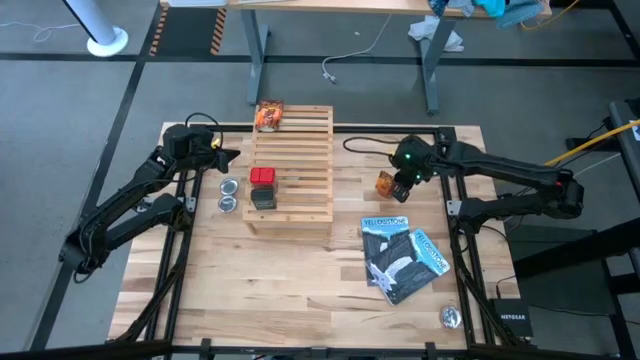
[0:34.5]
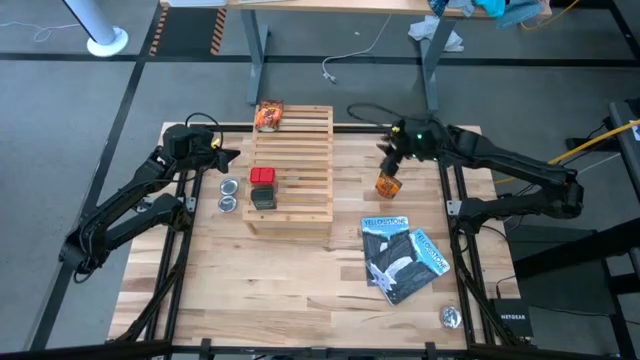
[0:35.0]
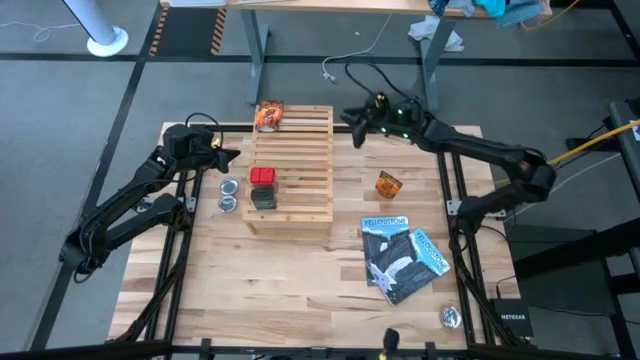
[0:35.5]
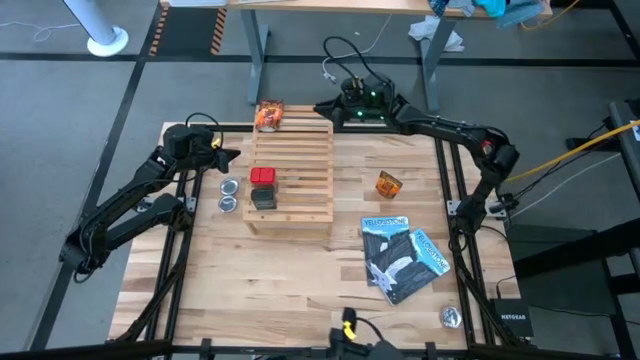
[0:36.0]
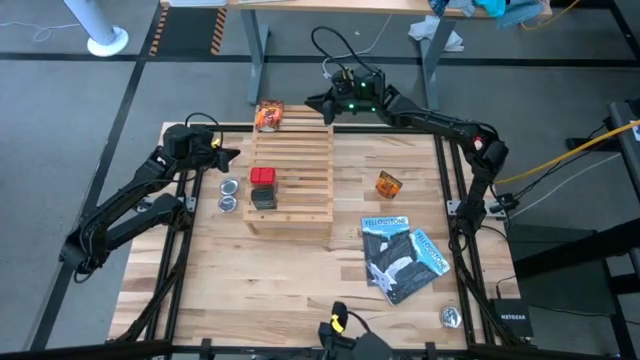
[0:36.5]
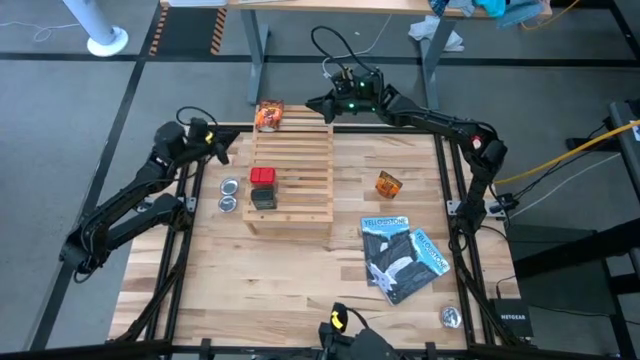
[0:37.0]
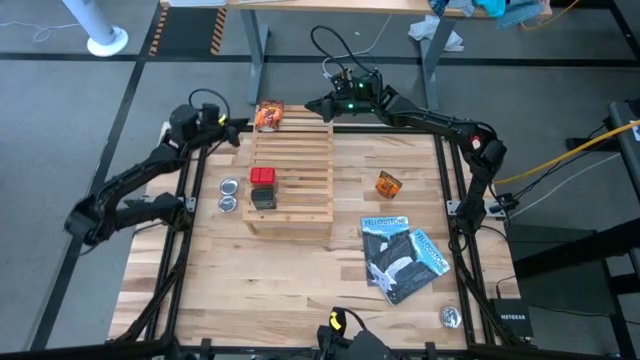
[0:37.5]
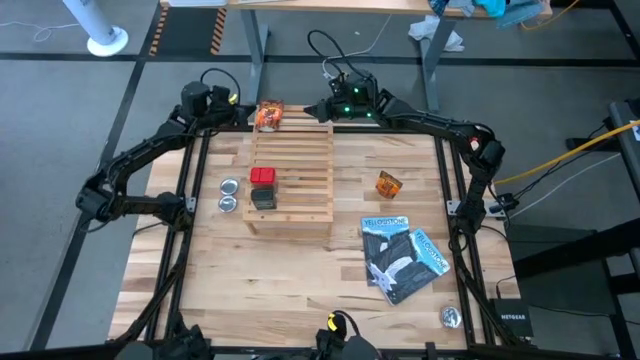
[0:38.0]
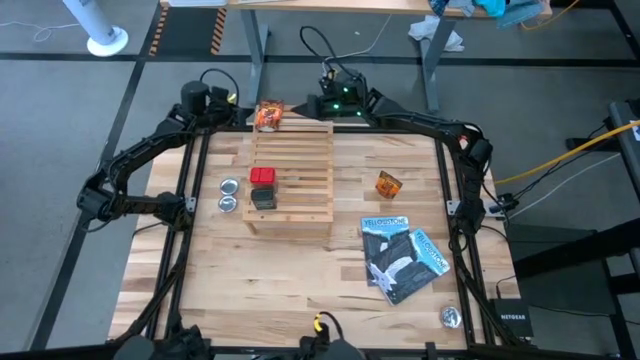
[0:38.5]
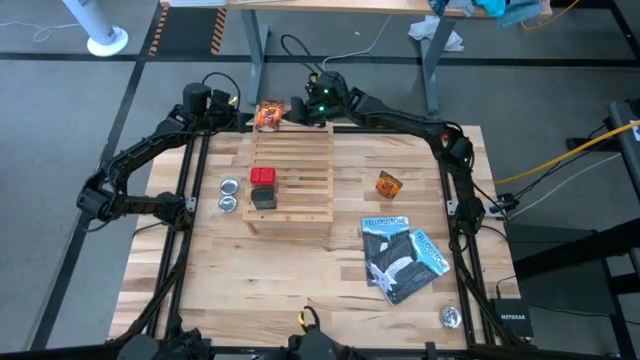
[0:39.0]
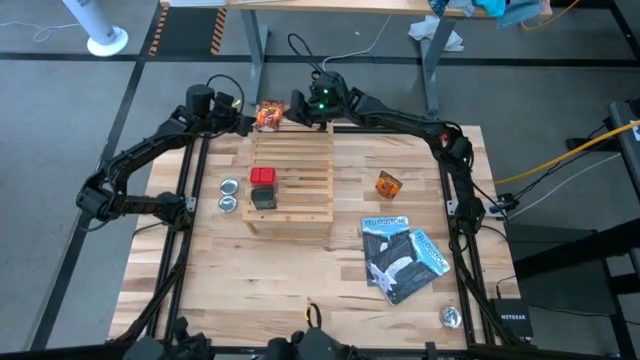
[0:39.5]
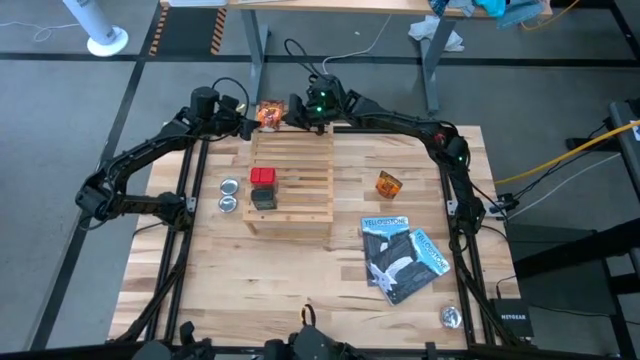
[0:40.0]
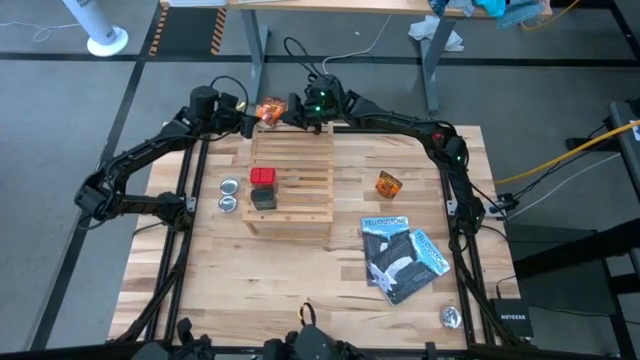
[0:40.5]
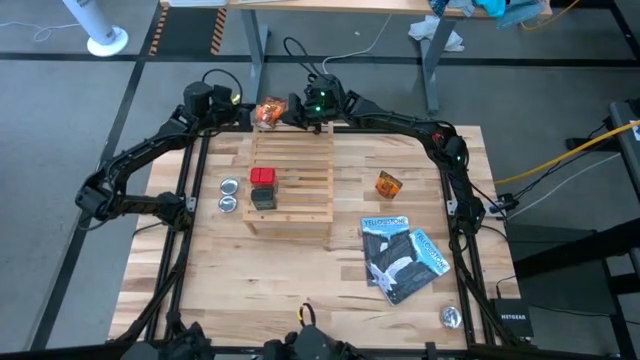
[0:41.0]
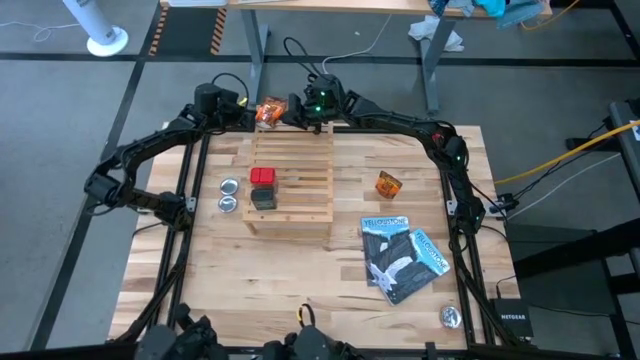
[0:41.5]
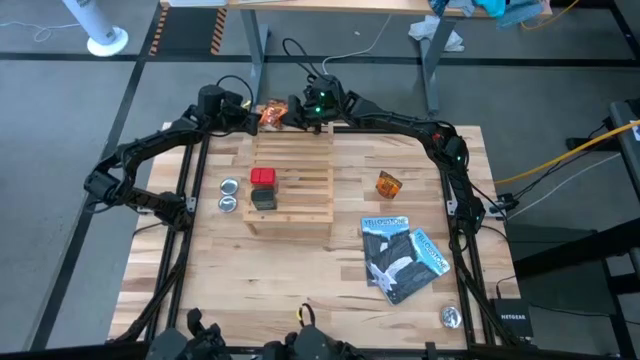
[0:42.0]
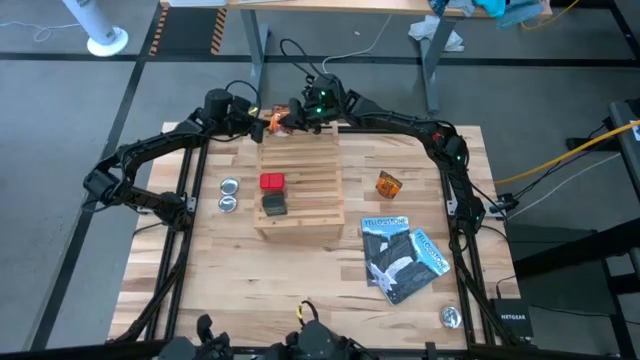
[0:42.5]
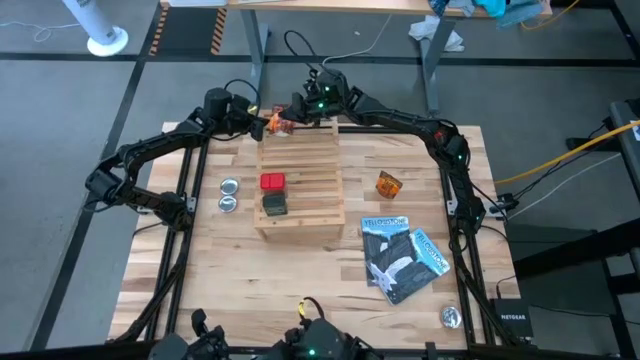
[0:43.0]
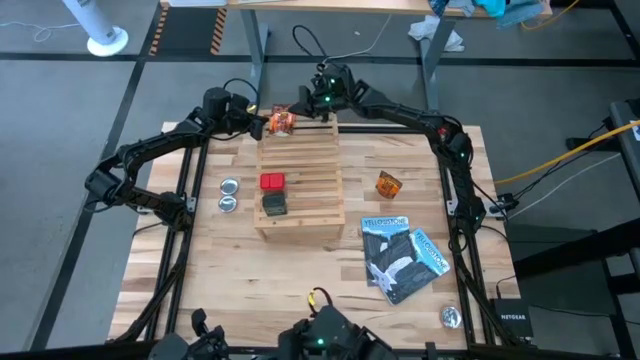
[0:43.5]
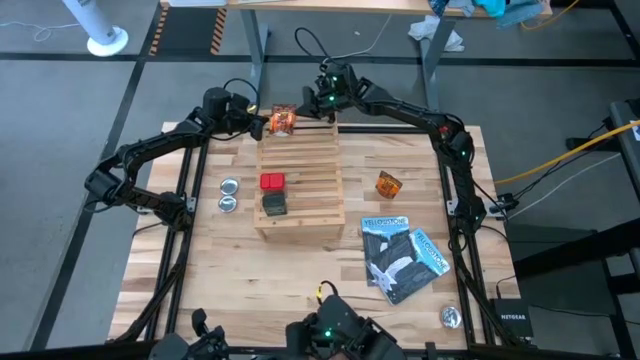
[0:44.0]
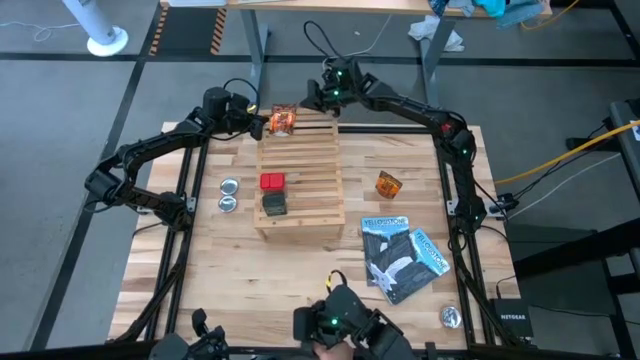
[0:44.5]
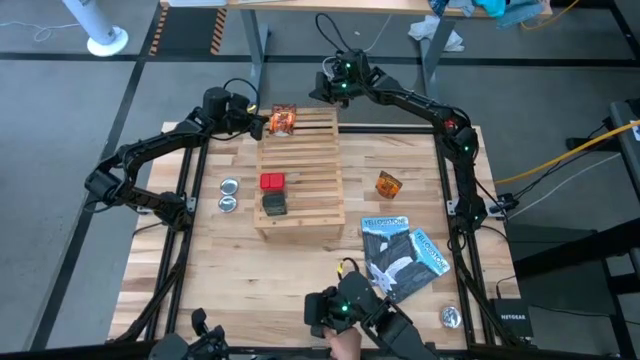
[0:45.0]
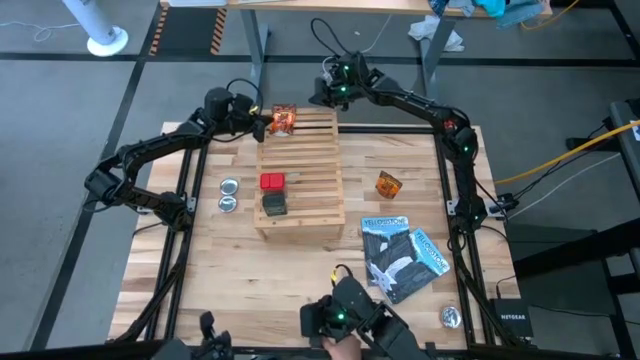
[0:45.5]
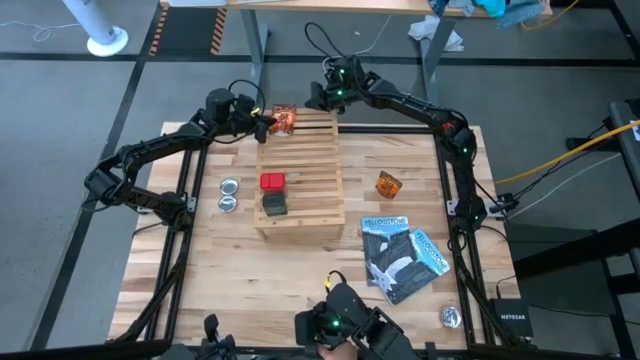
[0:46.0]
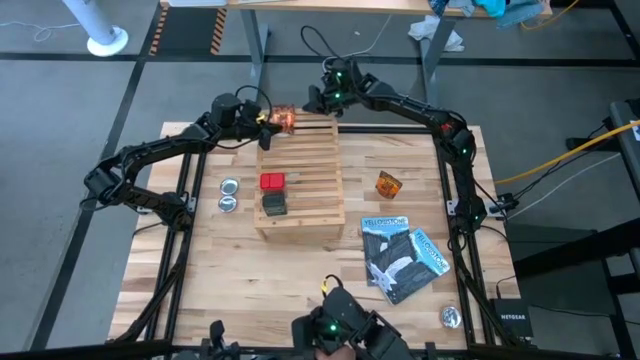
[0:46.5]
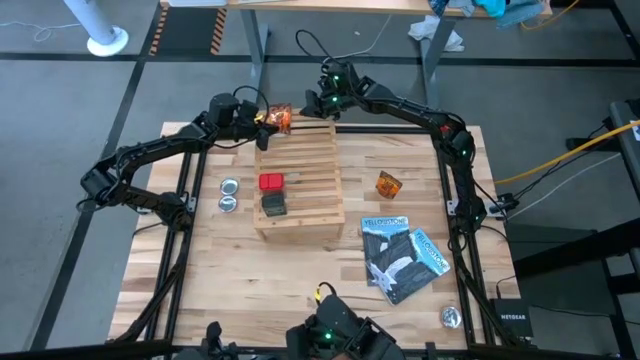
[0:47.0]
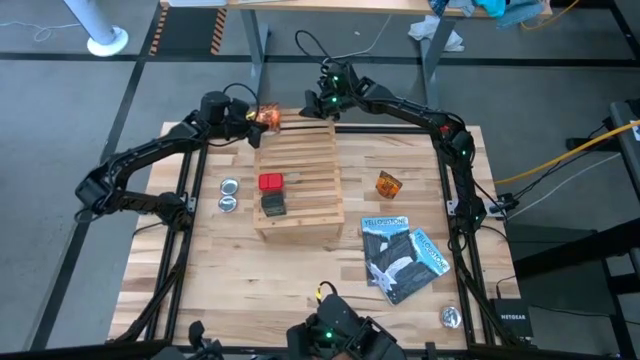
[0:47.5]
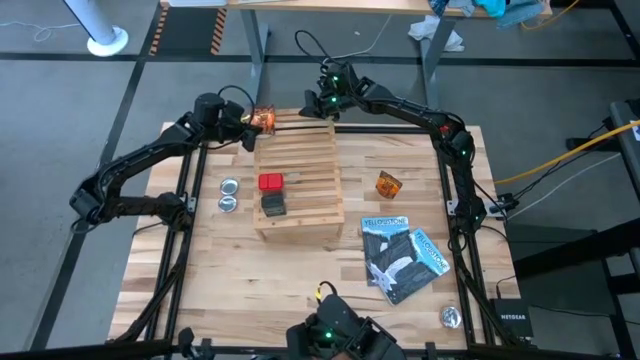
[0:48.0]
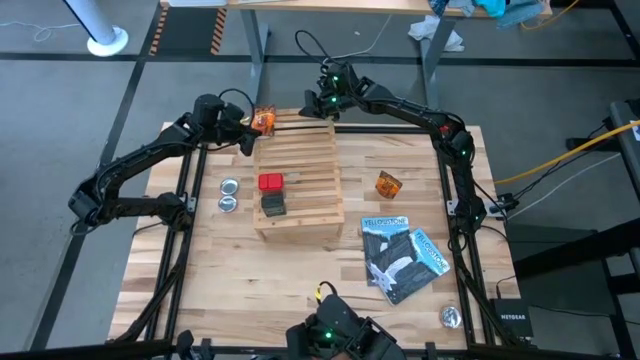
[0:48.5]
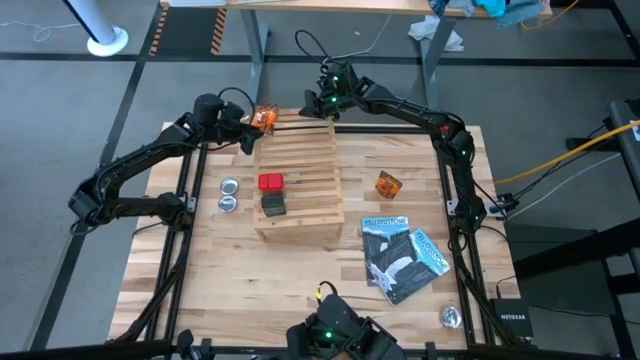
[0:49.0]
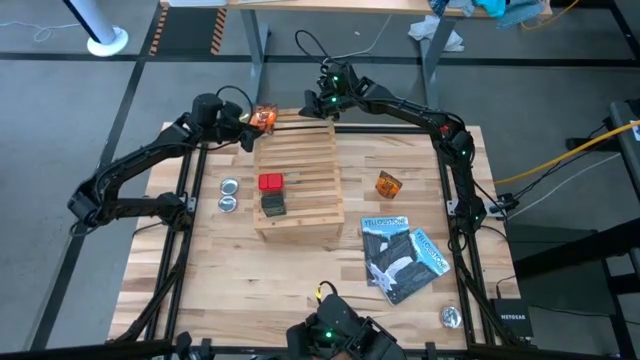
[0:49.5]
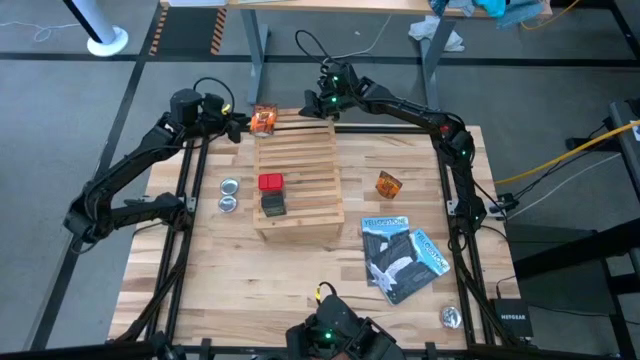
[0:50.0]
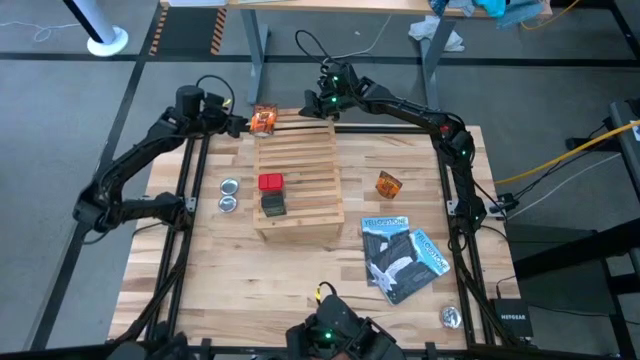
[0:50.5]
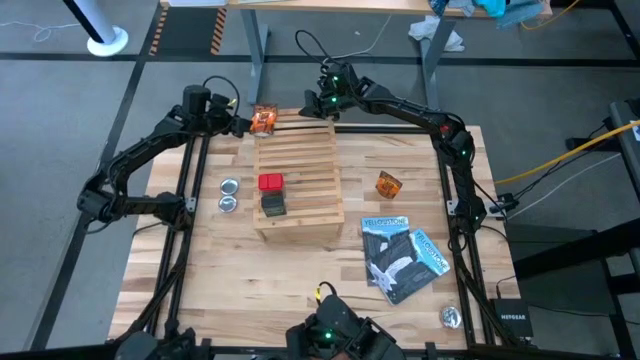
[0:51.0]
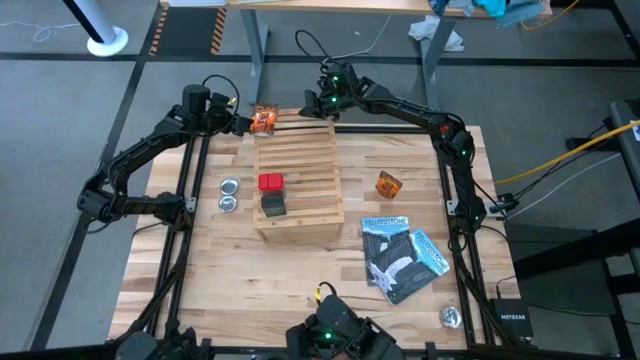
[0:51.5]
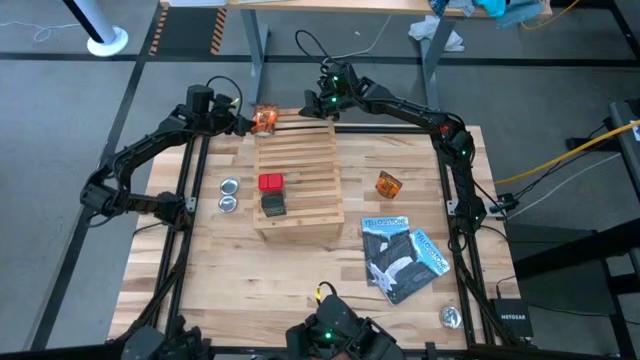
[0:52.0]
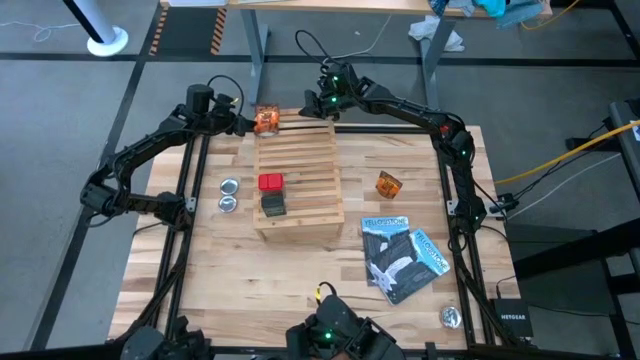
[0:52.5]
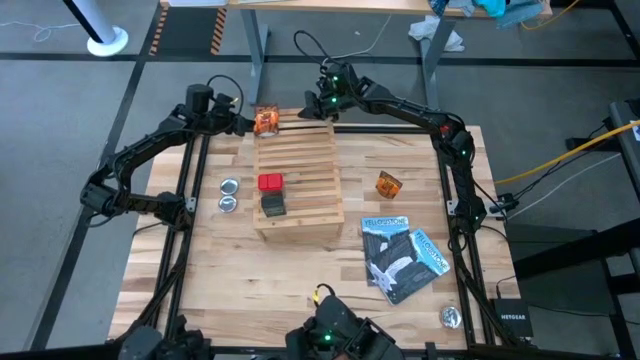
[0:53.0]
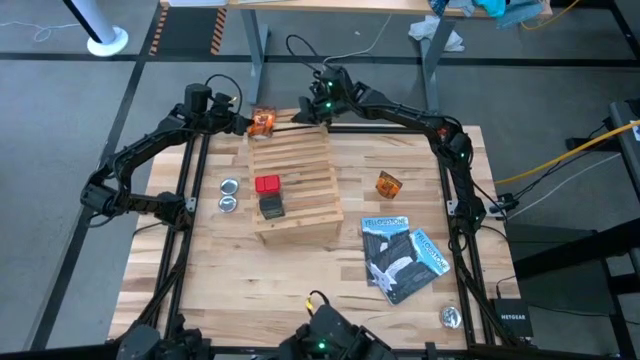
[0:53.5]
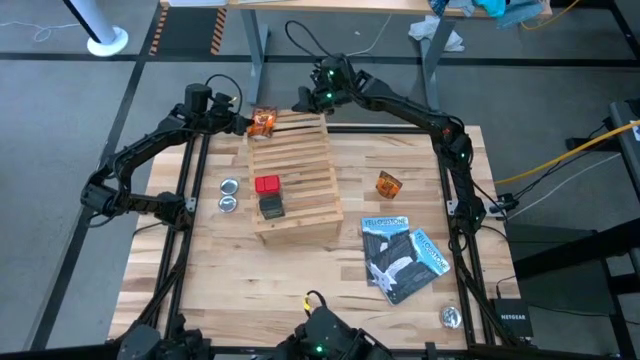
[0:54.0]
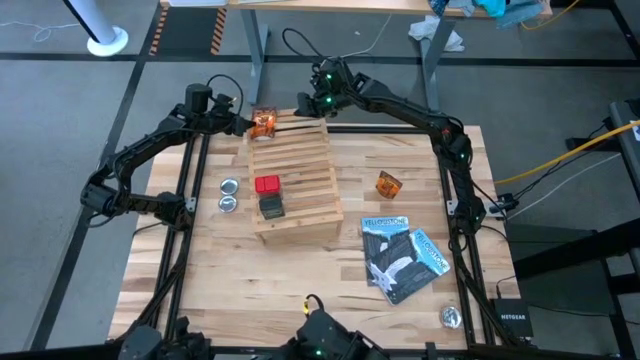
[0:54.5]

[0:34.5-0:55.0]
Task: Shelf spices
Remove the orange seasoning pack from the shelf

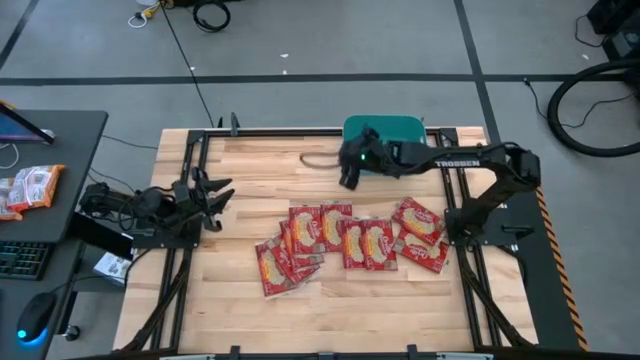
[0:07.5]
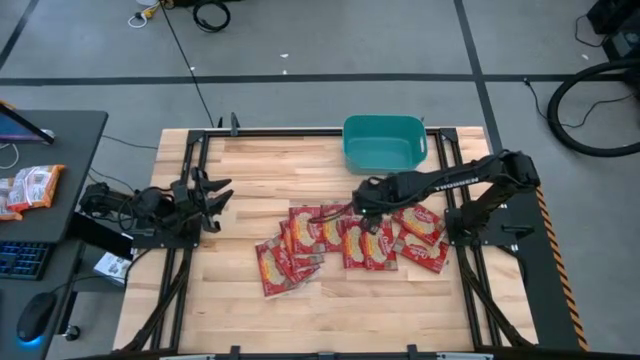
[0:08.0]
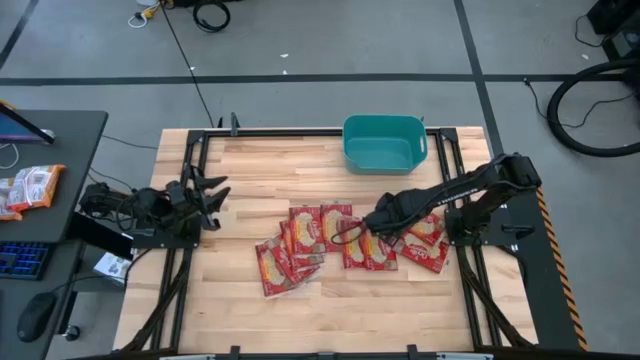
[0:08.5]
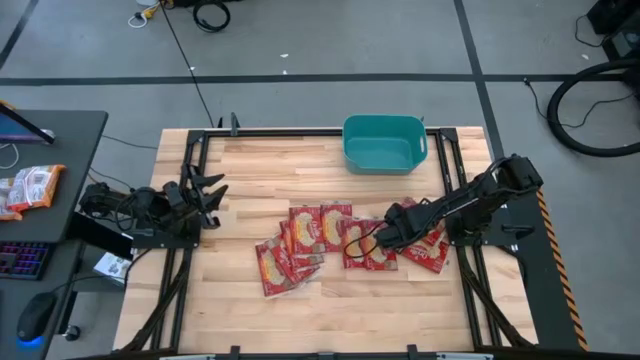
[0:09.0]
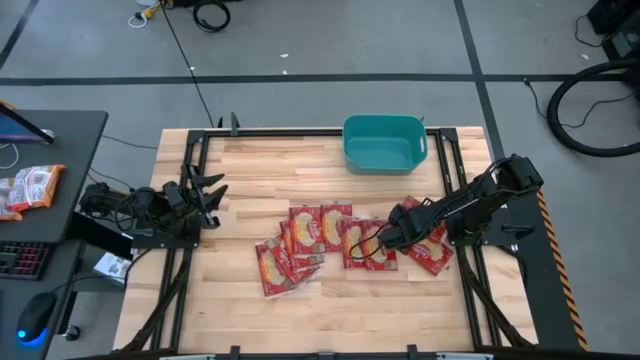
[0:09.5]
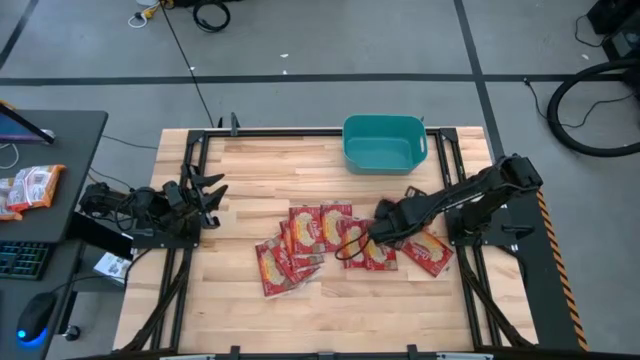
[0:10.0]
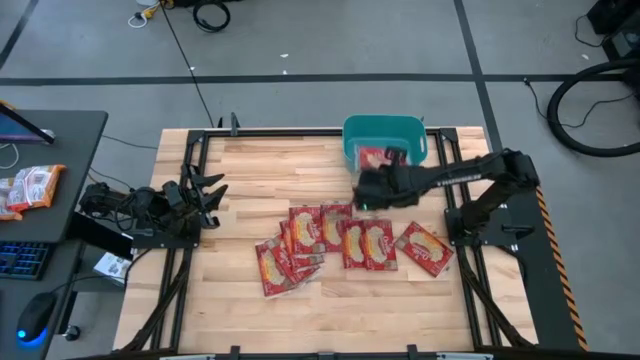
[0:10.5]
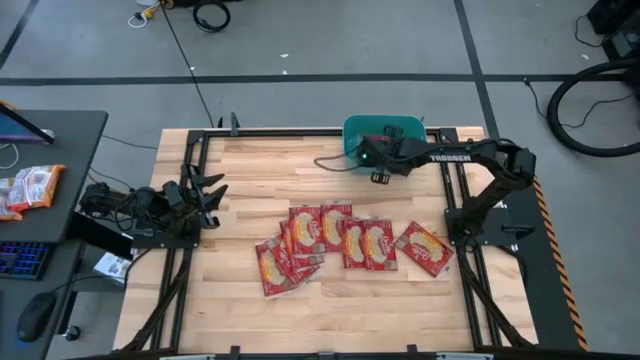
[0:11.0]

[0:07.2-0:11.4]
Task: Sort popcorn bags into baskets
Put the popcorn bag into the green bin
